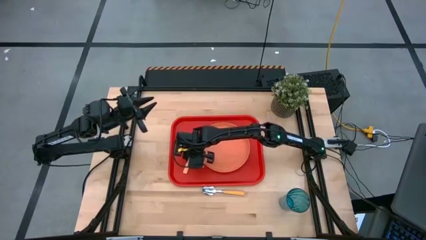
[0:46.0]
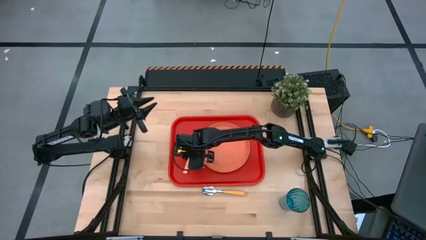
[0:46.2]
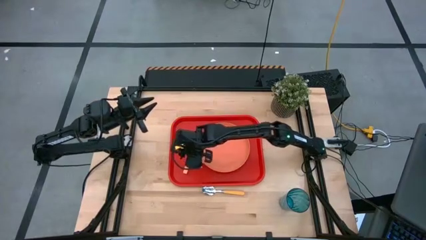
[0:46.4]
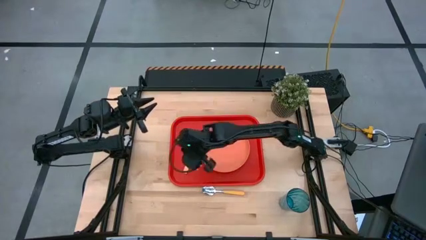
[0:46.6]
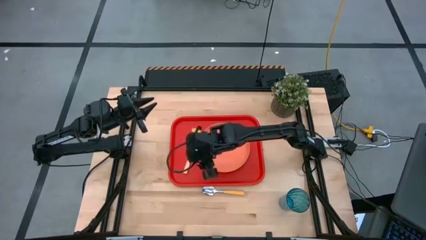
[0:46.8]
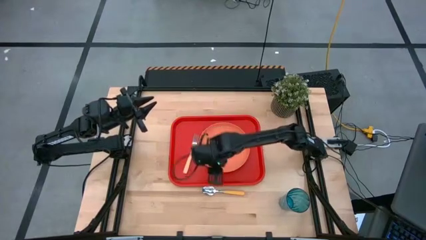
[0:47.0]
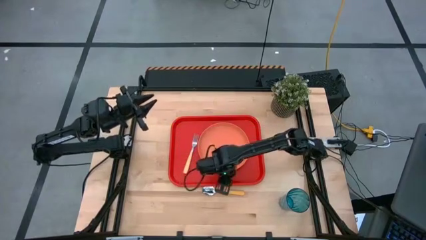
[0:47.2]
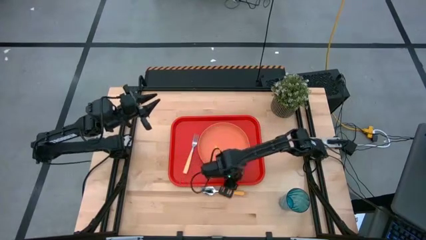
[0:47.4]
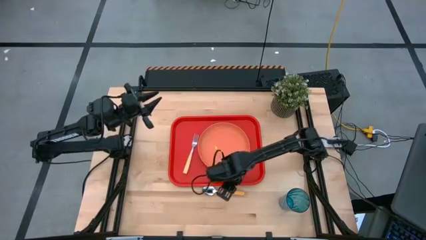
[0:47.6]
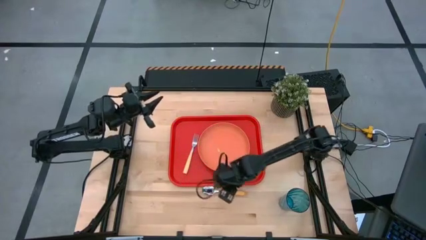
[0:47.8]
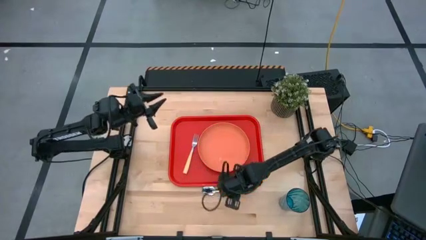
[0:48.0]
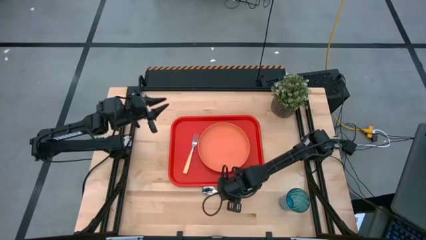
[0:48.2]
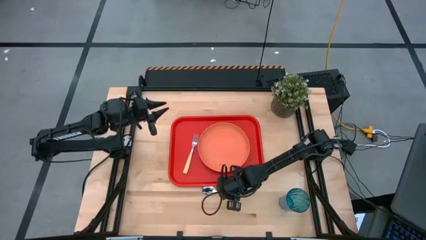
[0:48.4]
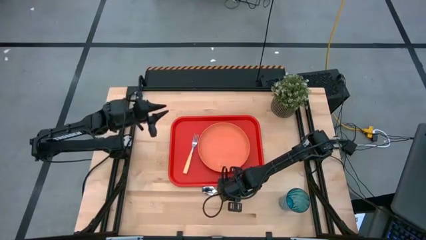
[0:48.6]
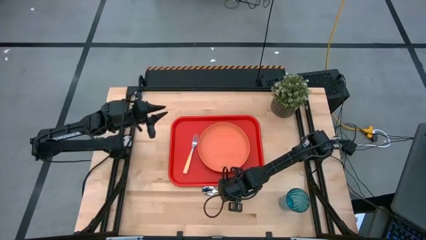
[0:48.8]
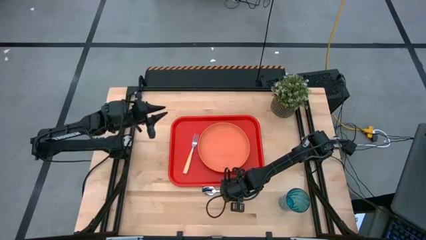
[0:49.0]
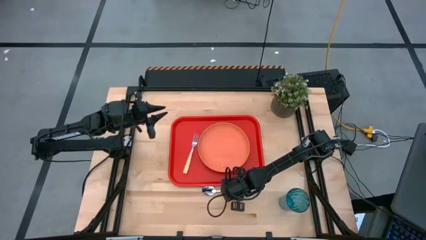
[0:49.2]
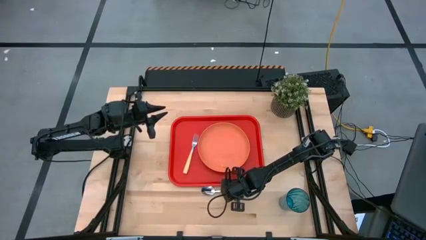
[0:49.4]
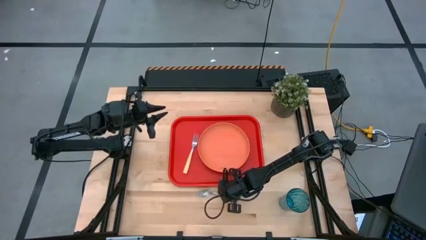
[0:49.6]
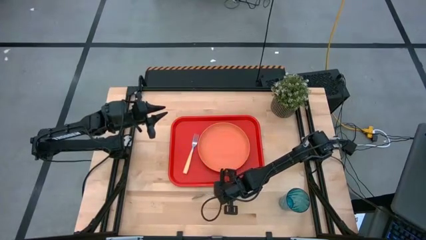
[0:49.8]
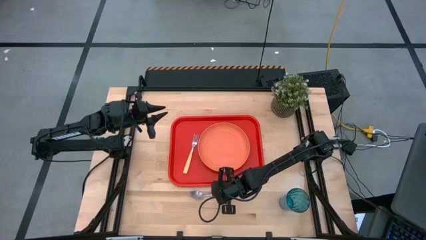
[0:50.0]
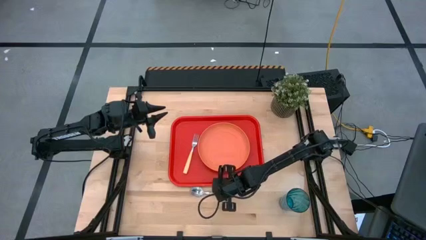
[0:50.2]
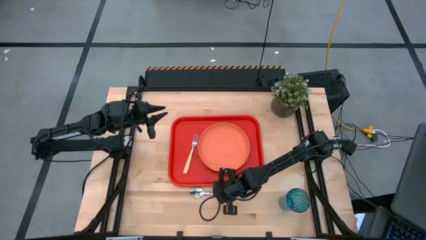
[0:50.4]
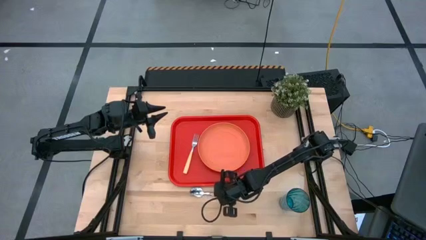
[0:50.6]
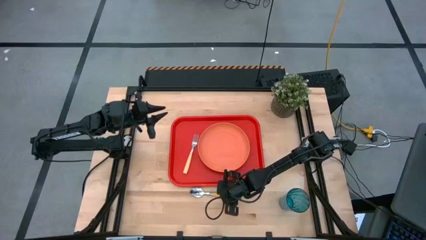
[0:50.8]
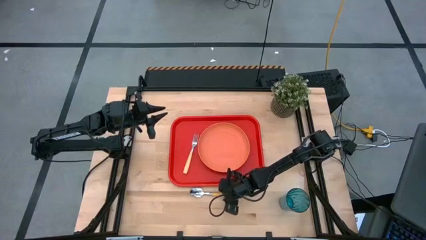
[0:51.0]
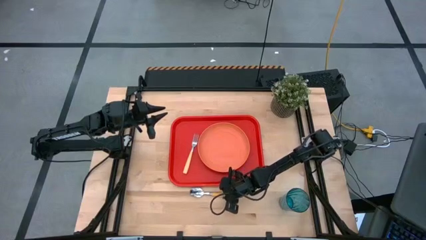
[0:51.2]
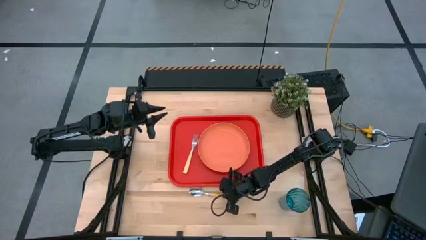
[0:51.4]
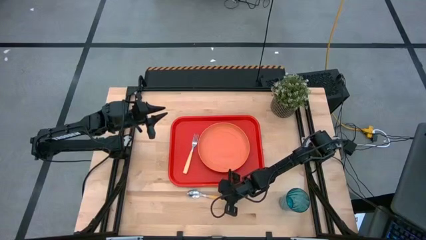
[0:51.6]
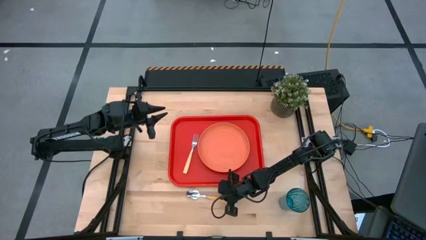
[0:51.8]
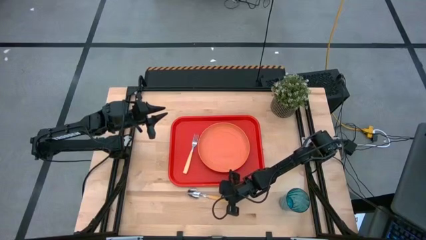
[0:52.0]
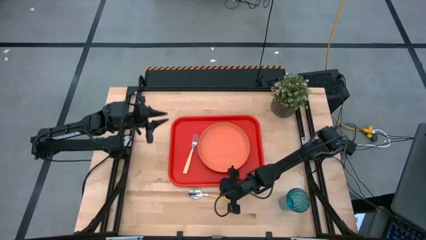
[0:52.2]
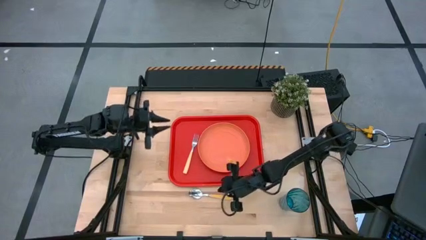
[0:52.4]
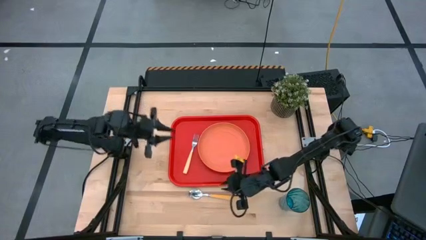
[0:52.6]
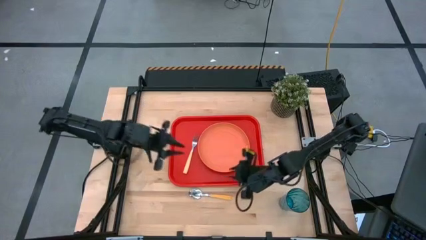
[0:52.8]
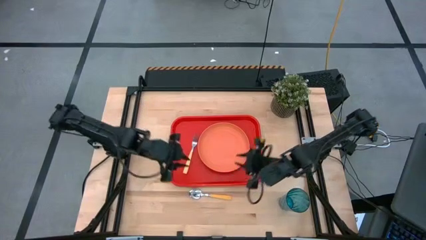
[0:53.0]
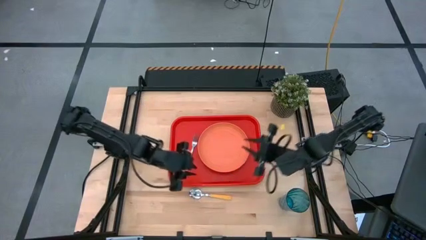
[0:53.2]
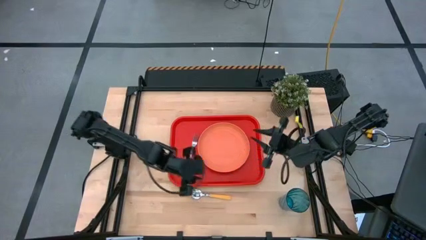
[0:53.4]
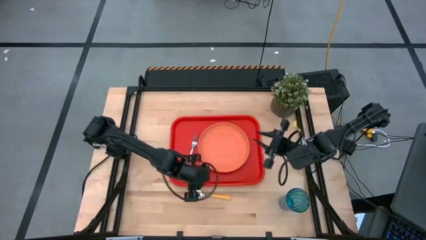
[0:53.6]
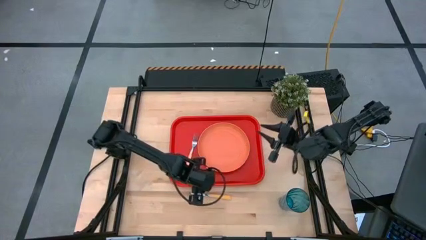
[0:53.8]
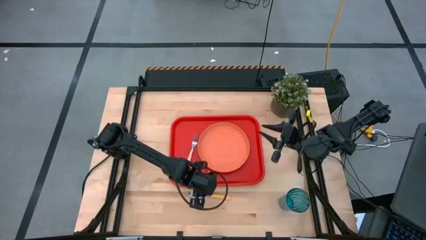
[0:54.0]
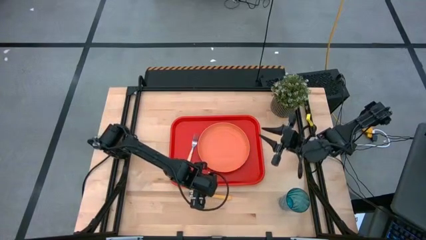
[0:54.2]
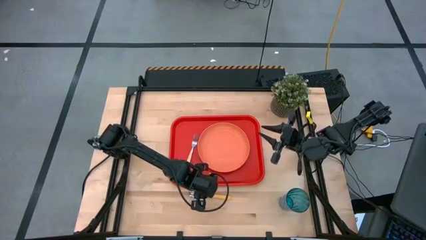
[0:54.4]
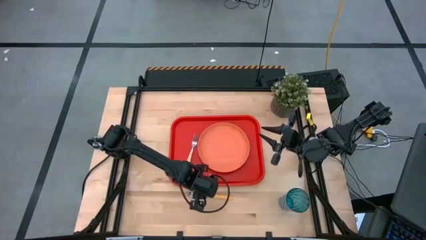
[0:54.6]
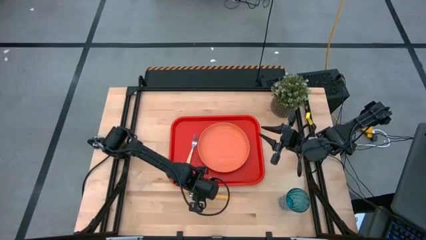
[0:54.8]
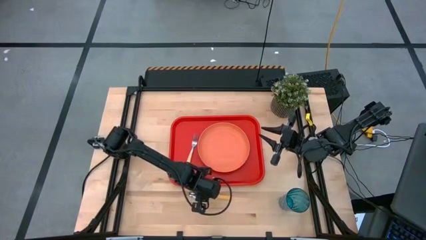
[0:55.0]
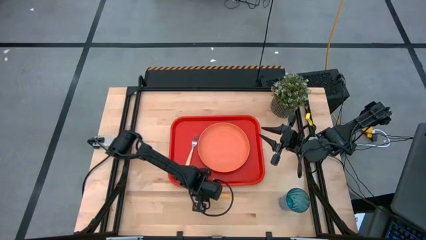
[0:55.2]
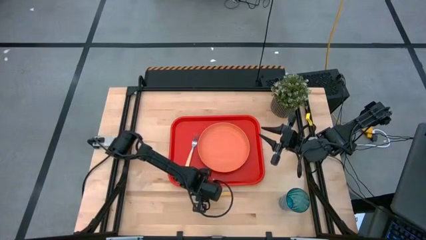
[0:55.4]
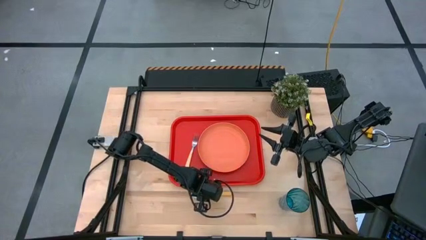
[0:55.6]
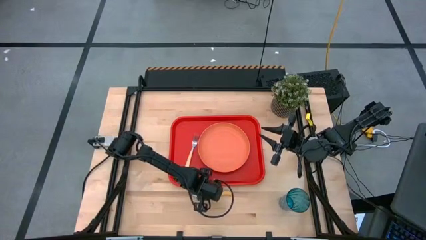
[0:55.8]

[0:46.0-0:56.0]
Task: Pick and place plate/cup/fork/spoon on tray
Put the yellow spoon on the orange serving tray
